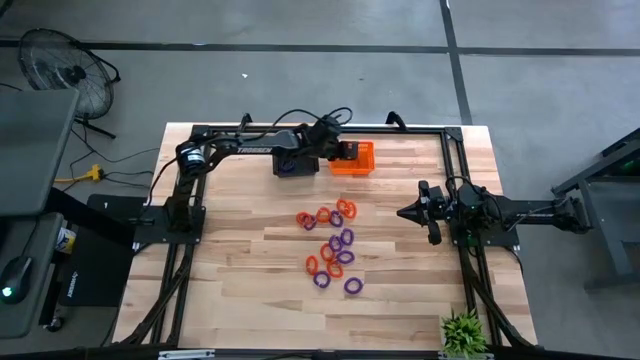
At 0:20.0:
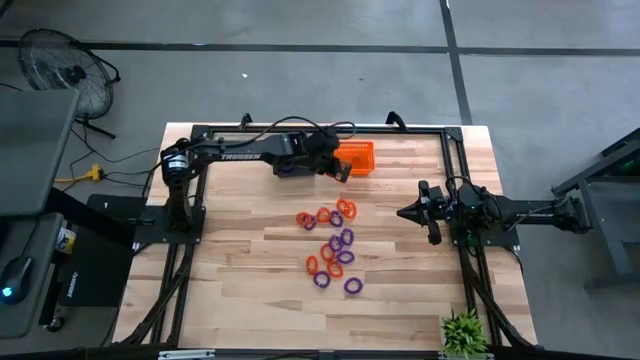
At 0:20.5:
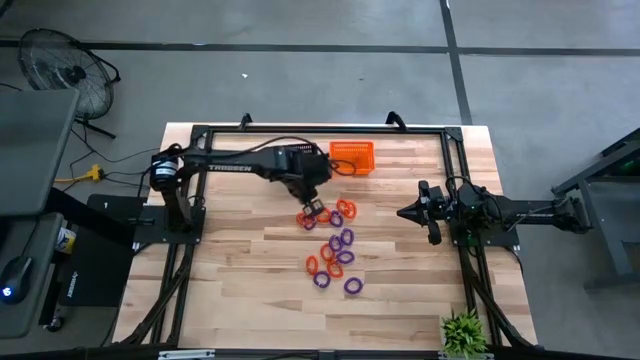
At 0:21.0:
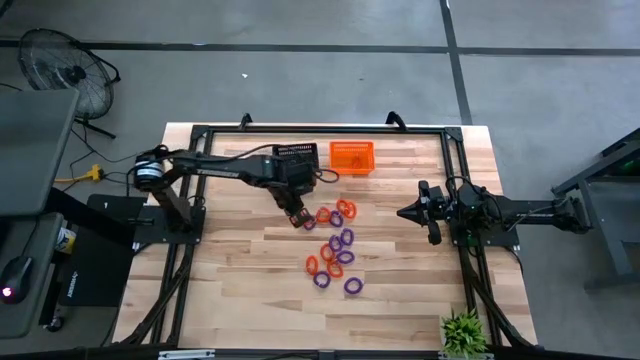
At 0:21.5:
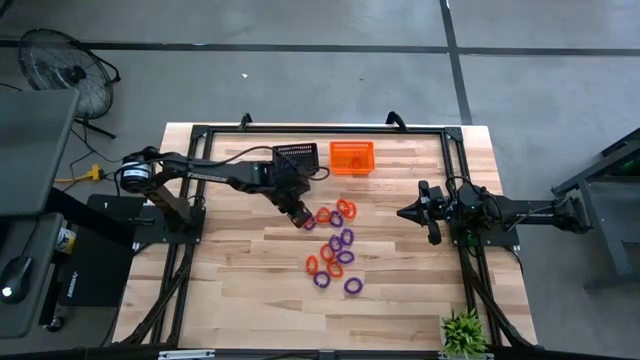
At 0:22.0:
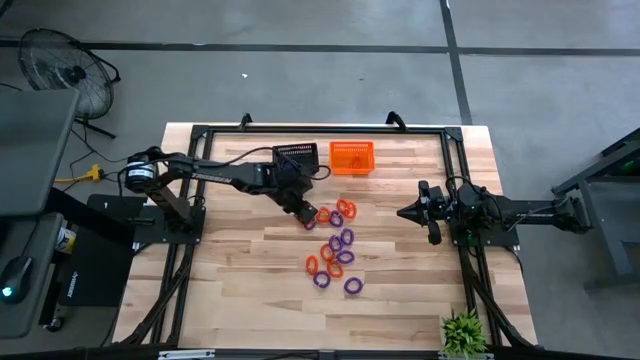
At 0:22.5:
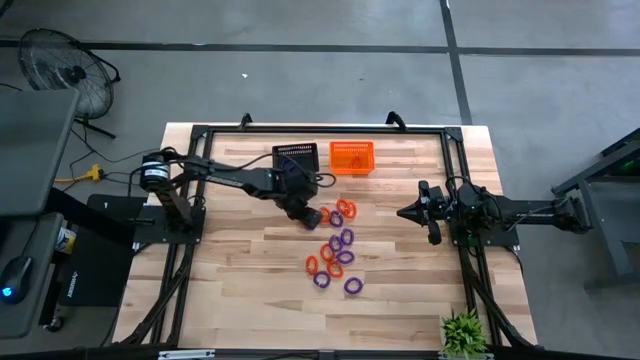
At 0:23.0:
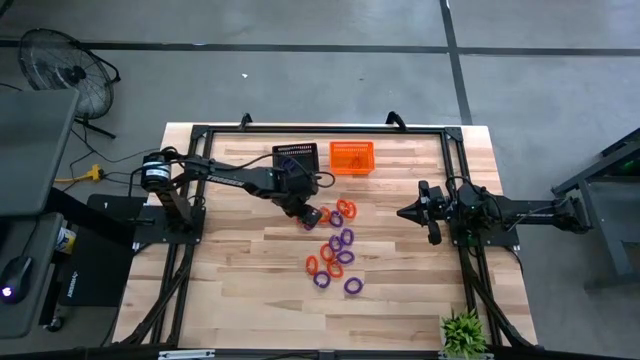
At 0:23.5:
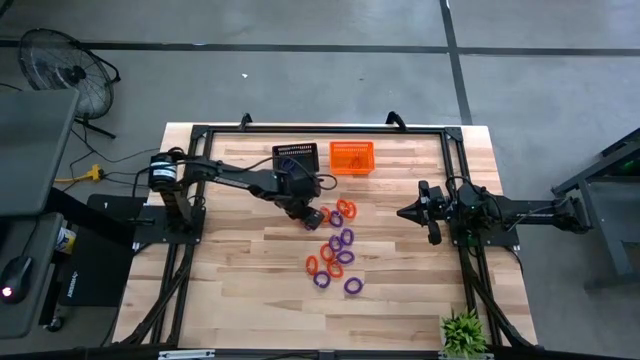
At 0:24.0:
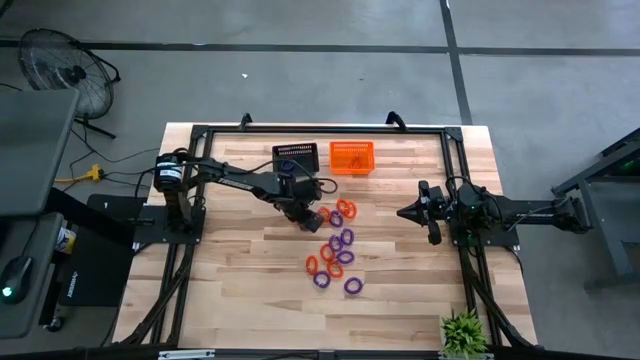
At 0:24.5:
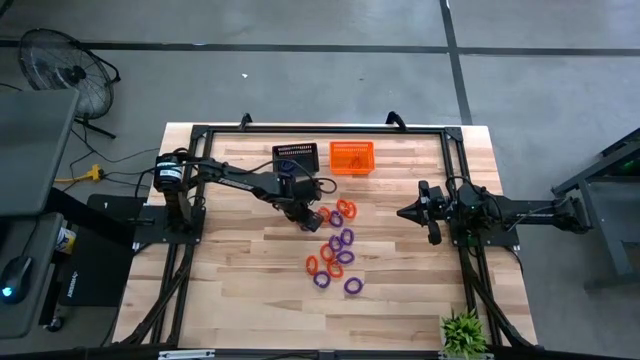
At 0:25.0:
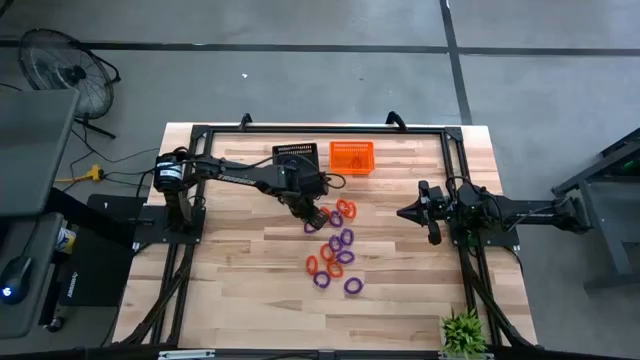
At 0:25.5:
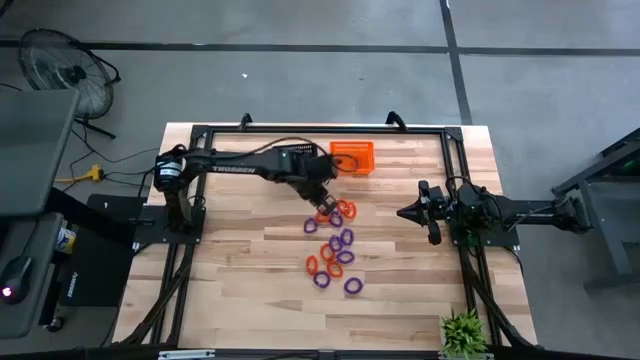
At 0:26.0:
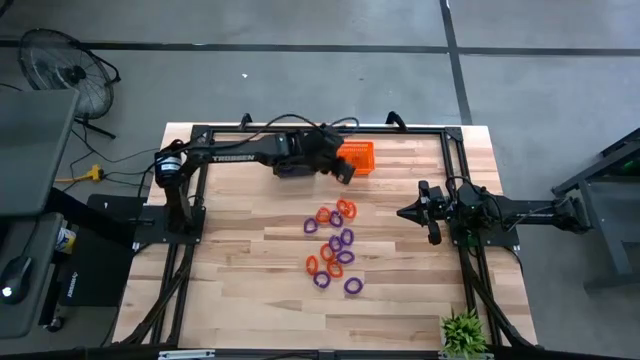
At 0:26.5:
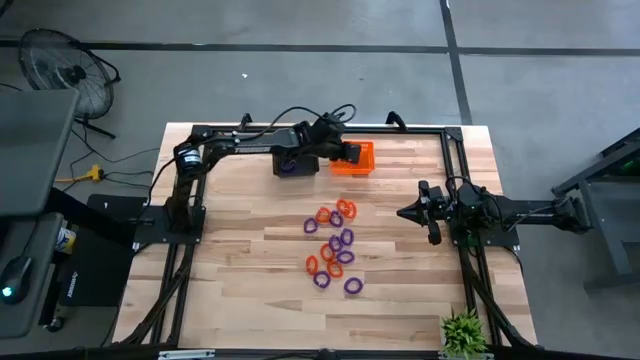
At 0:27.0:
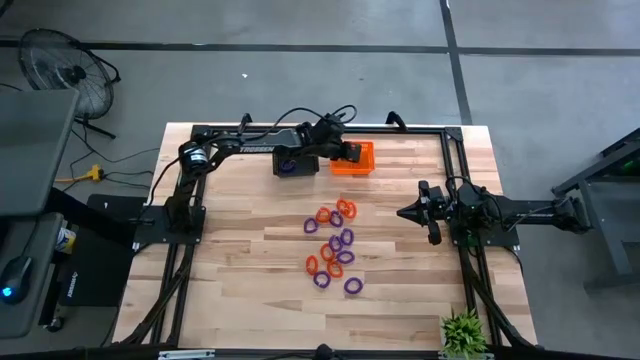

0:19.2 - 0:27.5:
Task: Sort spring keychains
Put the orange spring keychain into the orange bin

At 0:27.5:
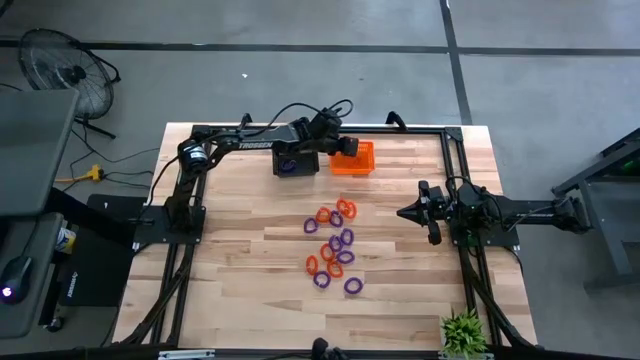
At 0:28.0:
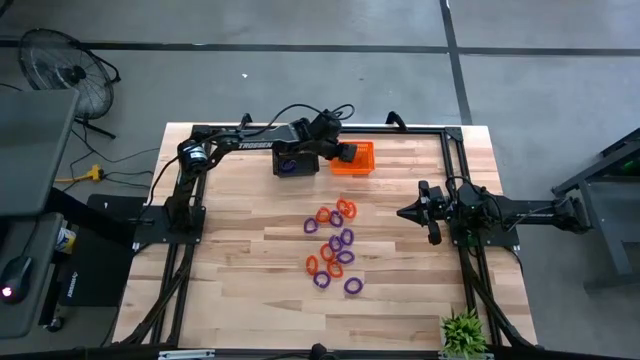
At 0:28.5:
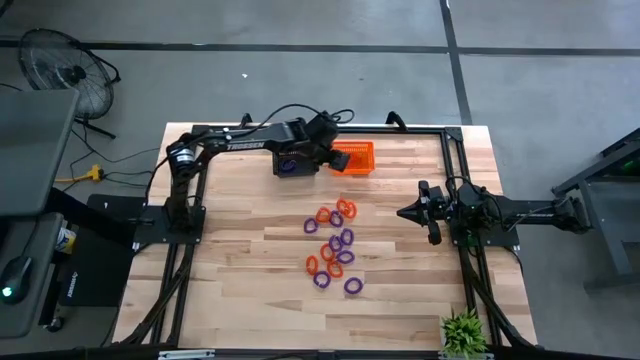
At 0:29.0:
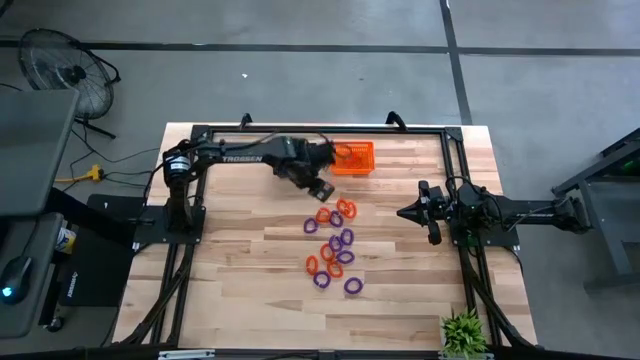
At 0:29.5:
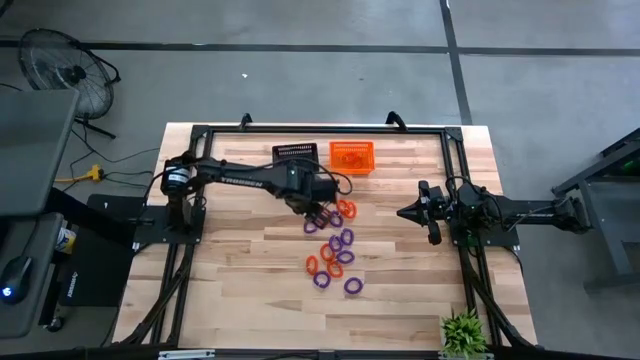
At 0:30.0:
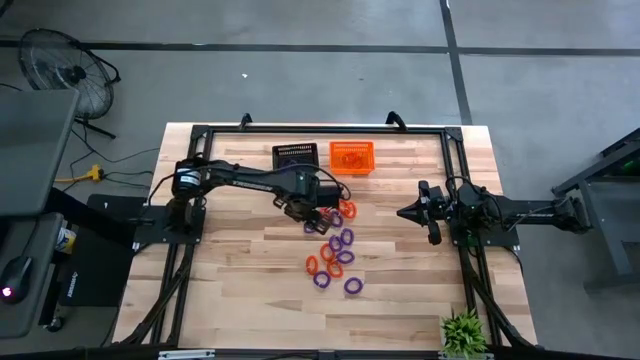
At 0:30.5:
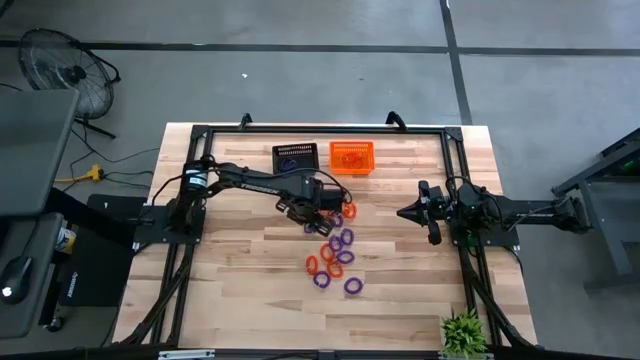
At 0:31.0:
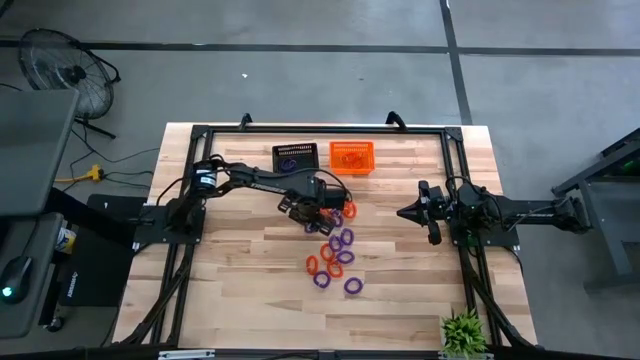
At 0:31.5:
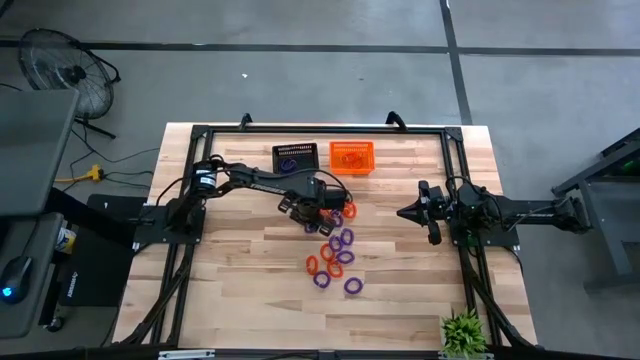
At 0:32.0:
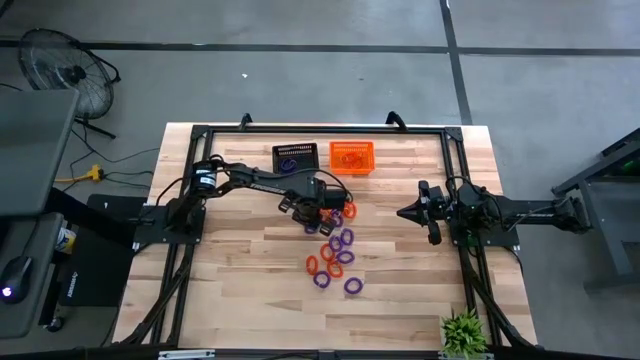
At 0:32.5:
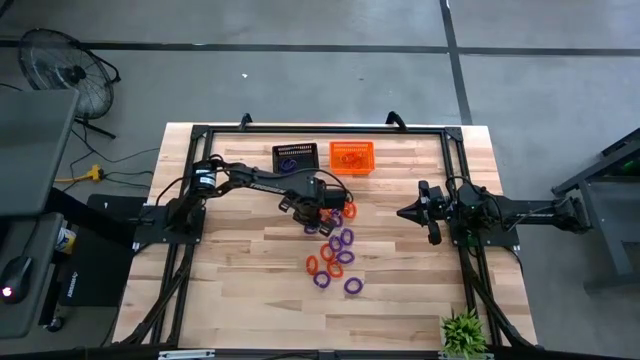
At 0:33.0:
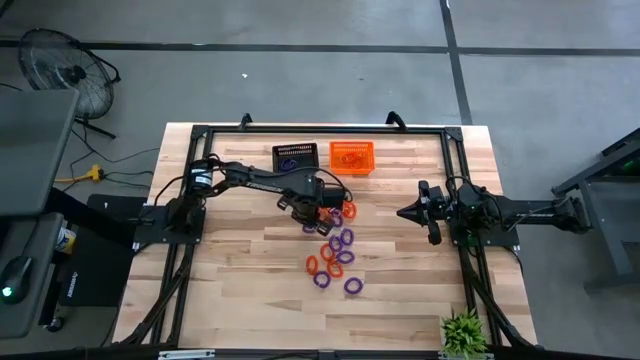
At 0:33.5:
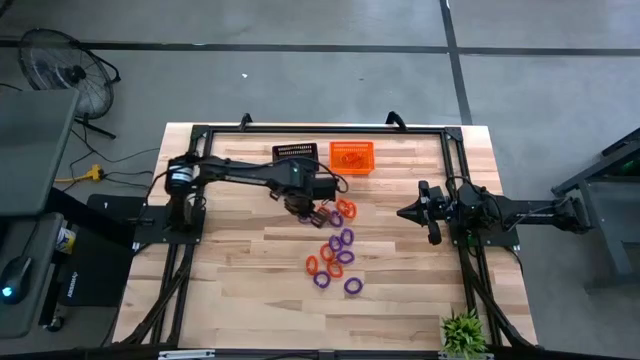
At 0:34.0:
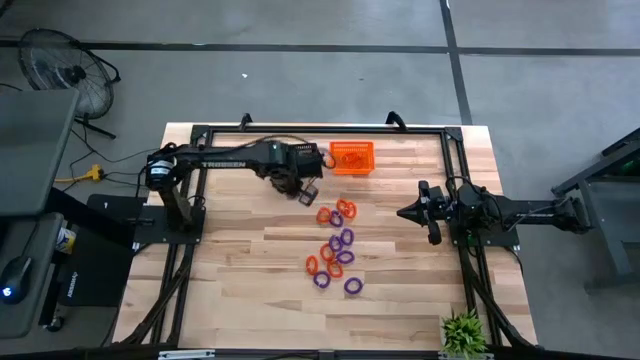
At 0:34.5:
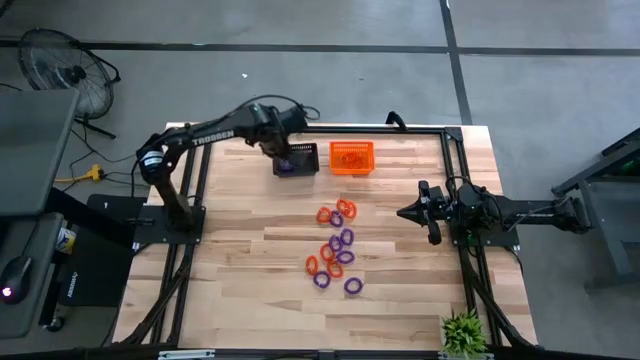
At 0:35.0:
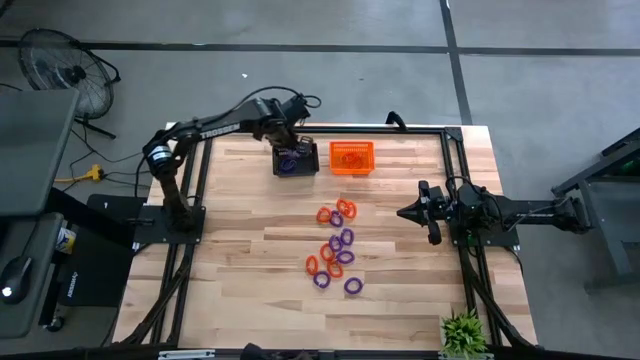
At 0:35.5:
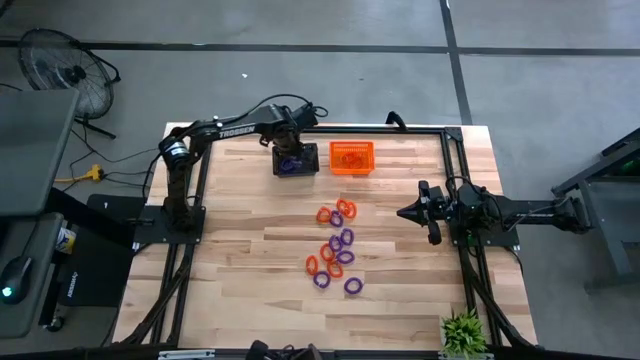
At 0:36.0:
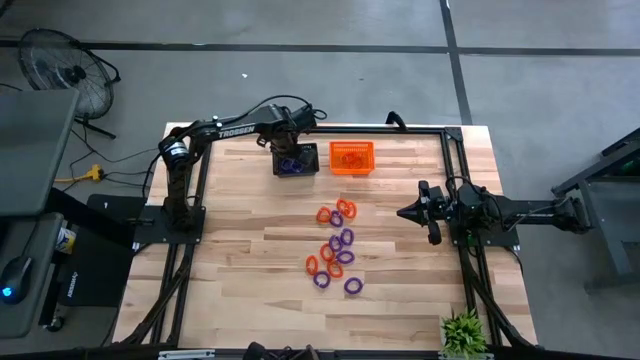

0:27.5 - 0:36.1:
Put the purple spring keychain into the purple bin

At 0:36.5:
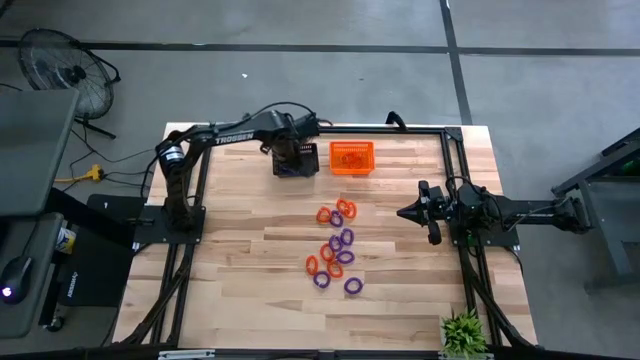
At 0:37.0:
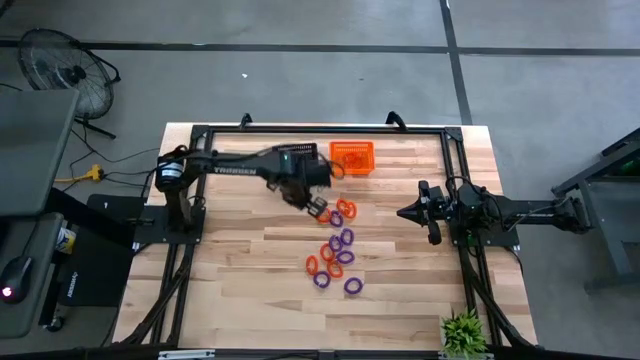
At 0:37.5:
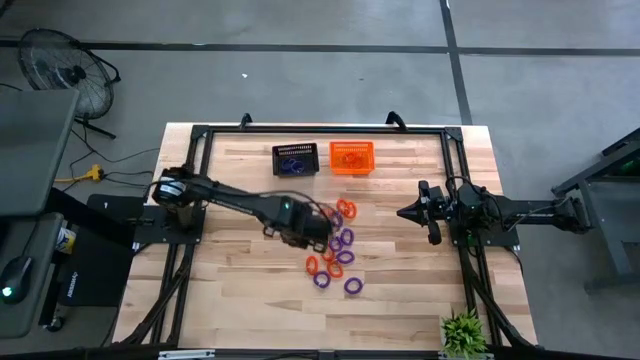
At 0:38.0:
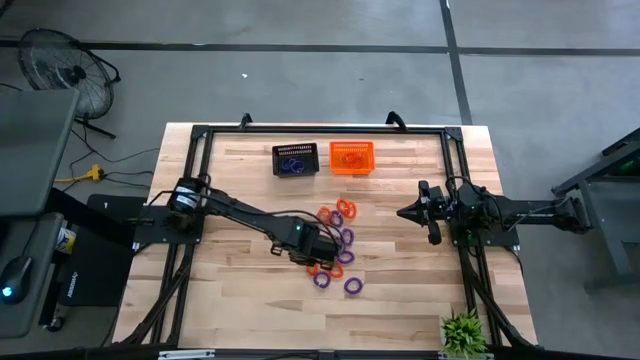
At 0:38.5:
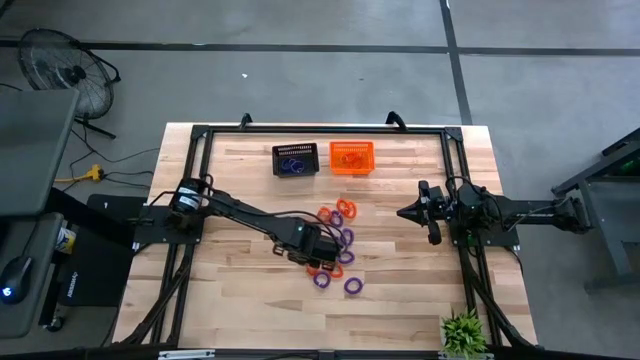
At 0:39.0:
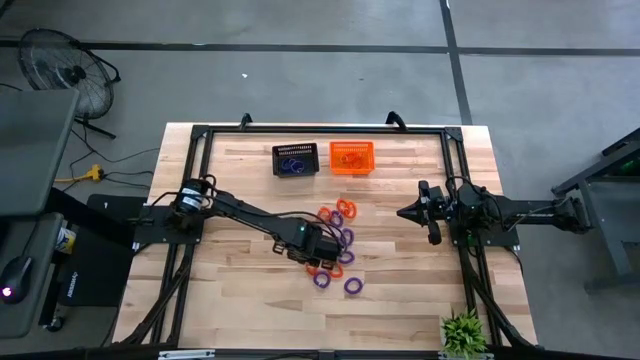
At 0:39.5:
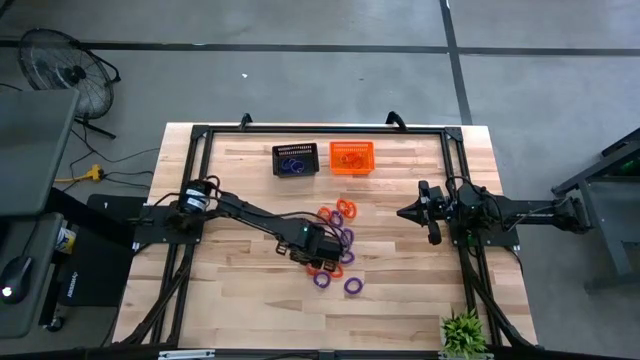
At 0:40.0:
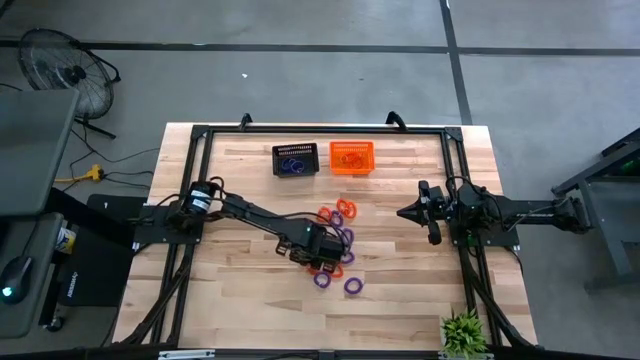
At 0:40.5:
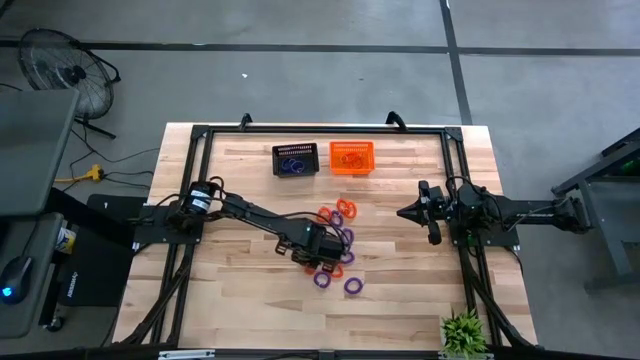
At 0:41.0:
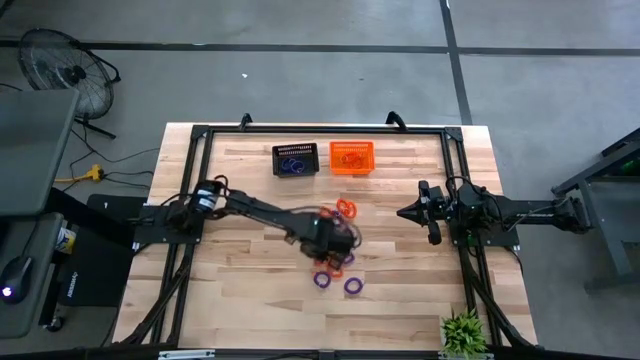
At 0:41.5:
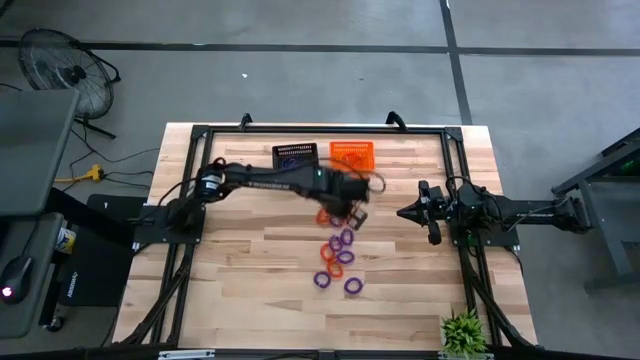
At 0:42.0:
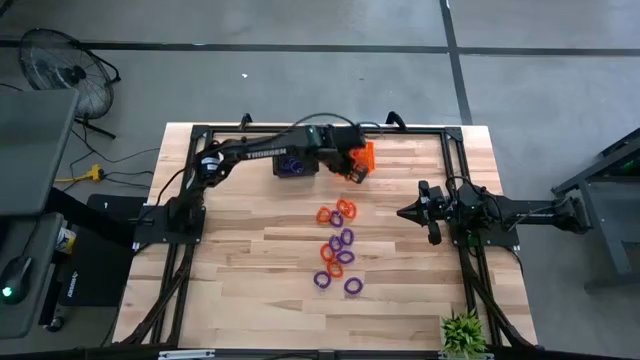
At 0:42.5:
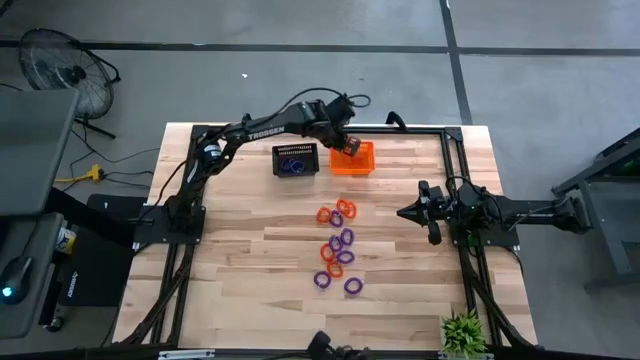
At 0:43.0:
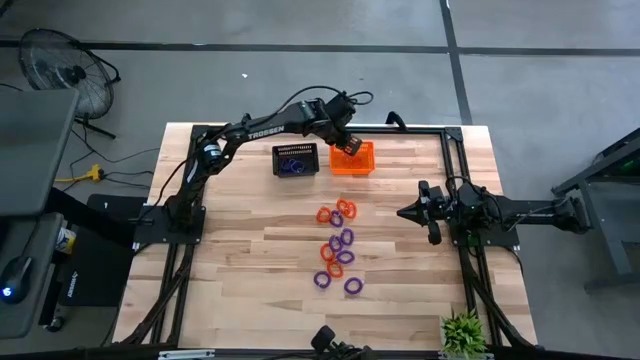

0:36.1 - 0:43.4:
Put the orange spring keychain into the orange bin
